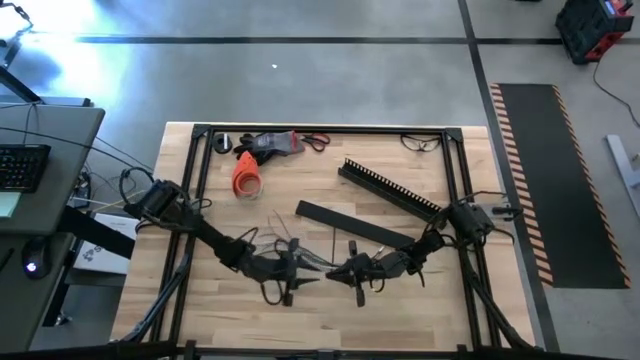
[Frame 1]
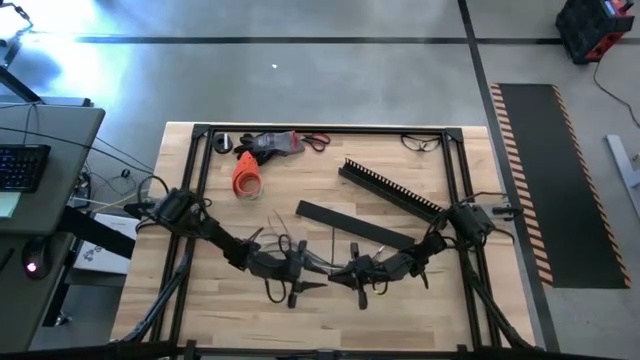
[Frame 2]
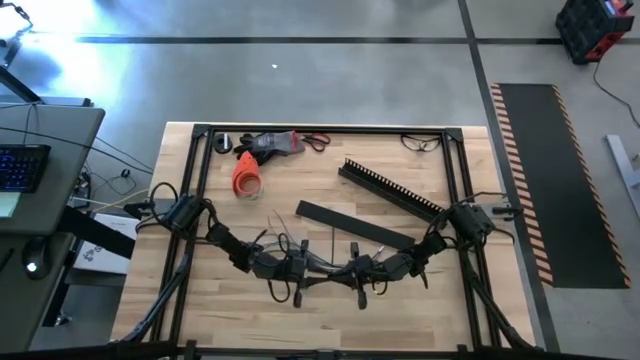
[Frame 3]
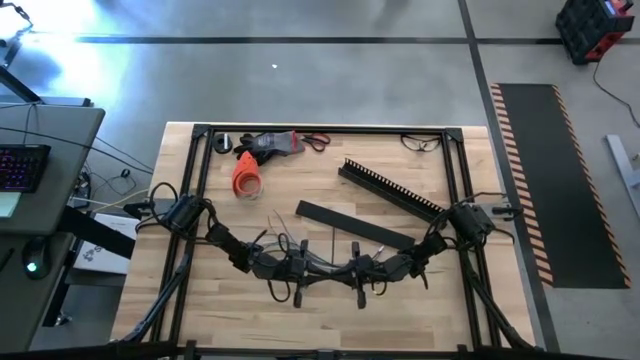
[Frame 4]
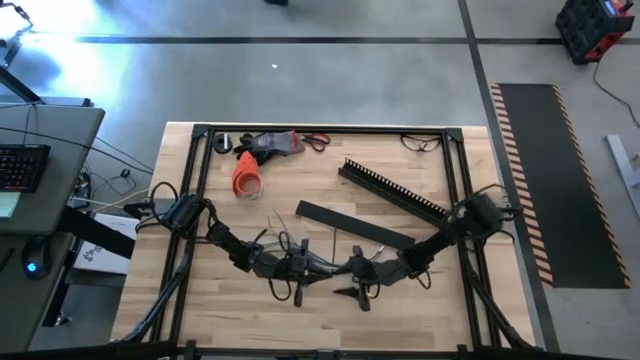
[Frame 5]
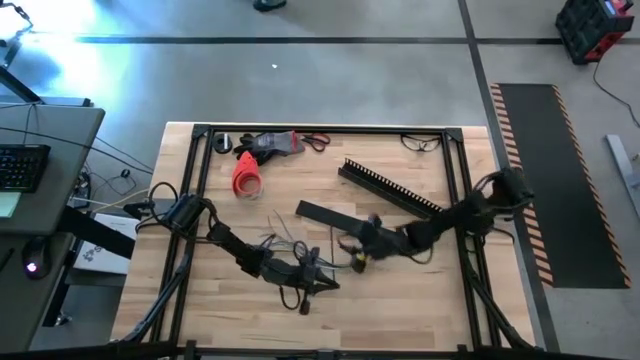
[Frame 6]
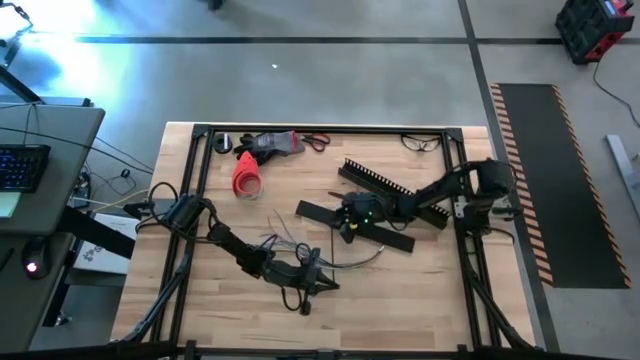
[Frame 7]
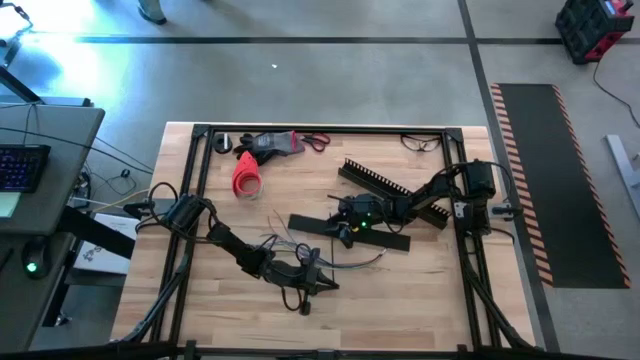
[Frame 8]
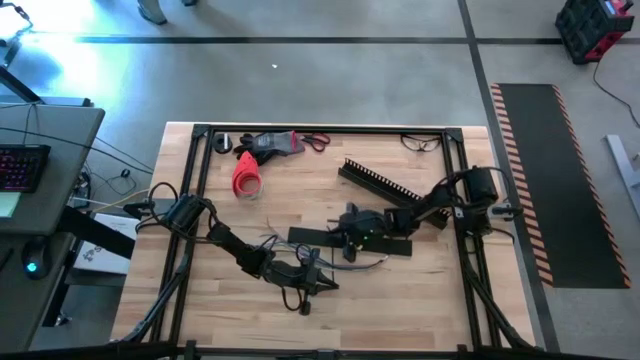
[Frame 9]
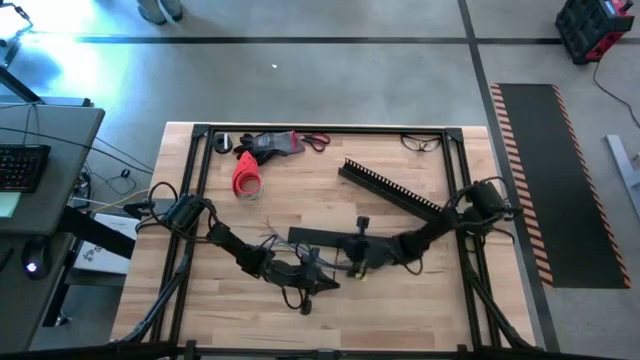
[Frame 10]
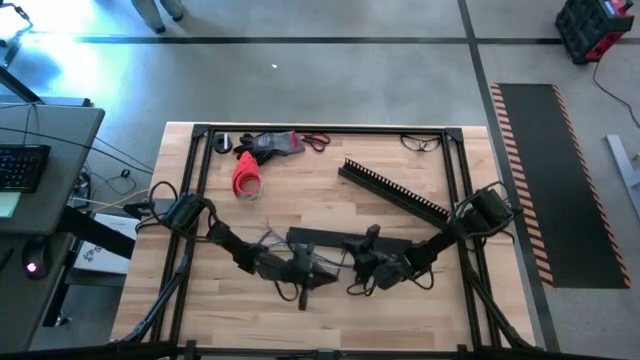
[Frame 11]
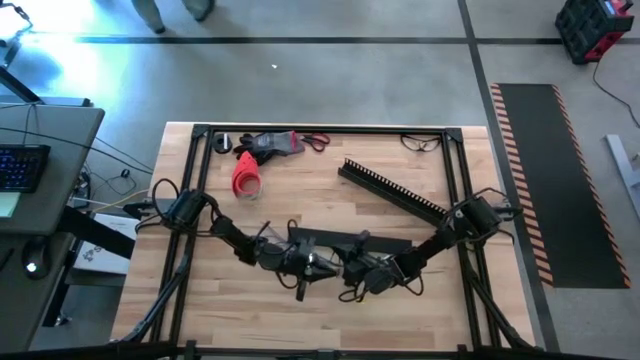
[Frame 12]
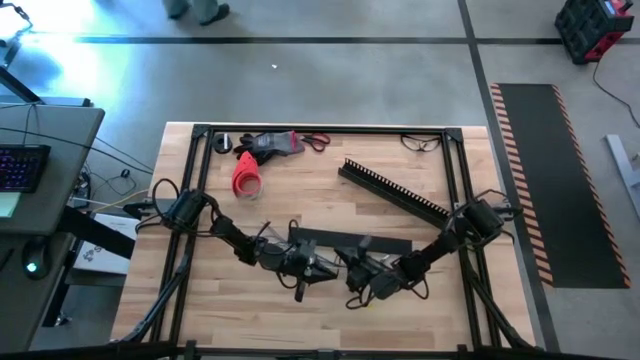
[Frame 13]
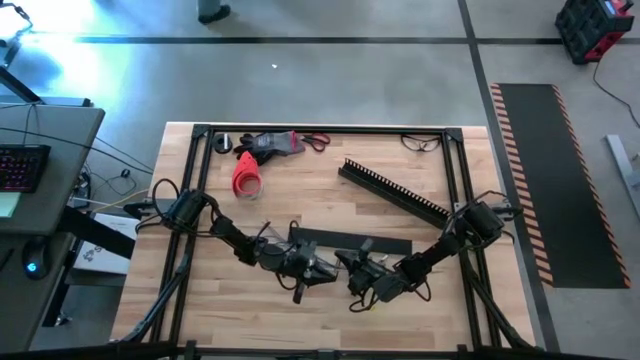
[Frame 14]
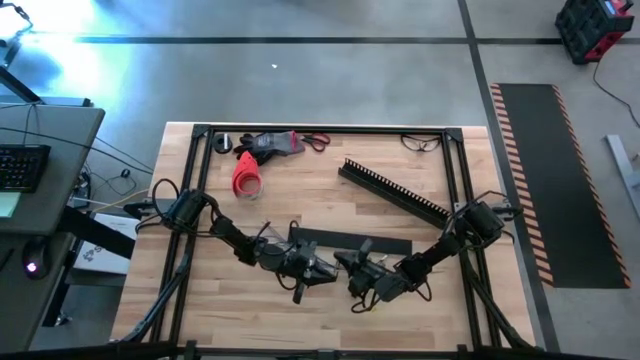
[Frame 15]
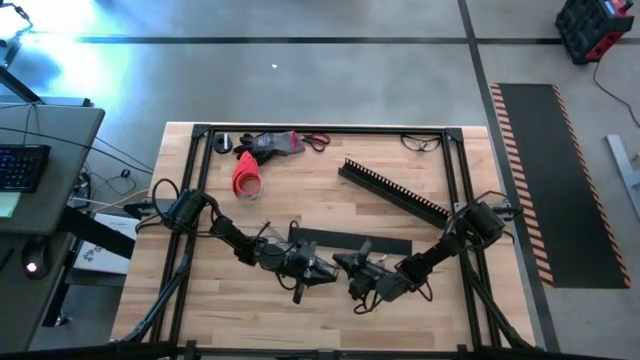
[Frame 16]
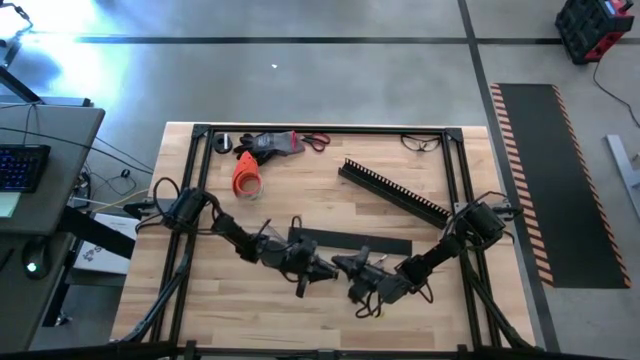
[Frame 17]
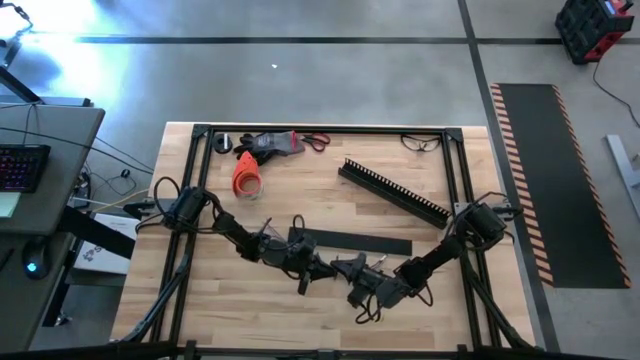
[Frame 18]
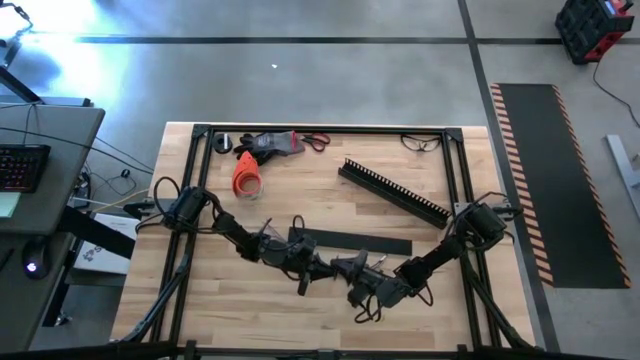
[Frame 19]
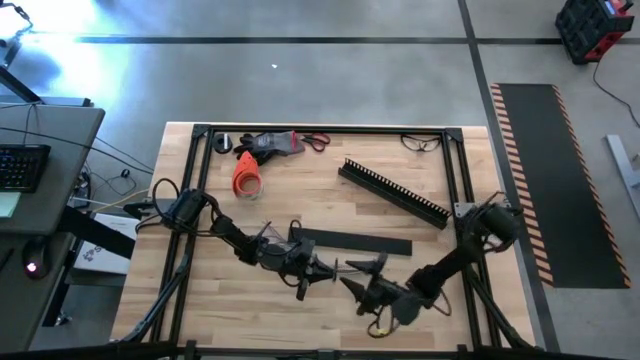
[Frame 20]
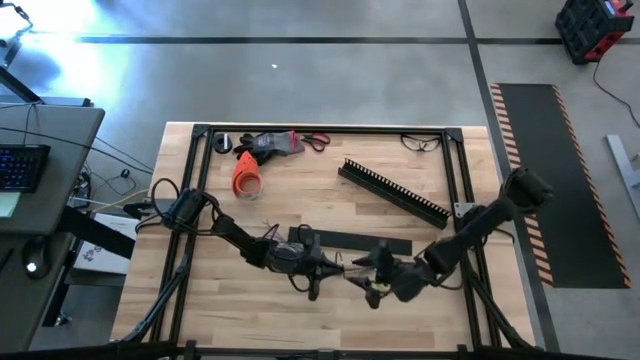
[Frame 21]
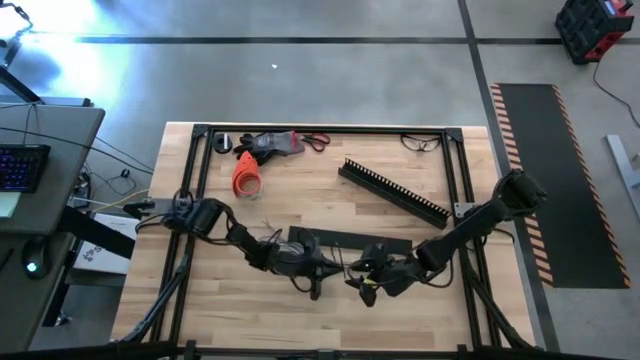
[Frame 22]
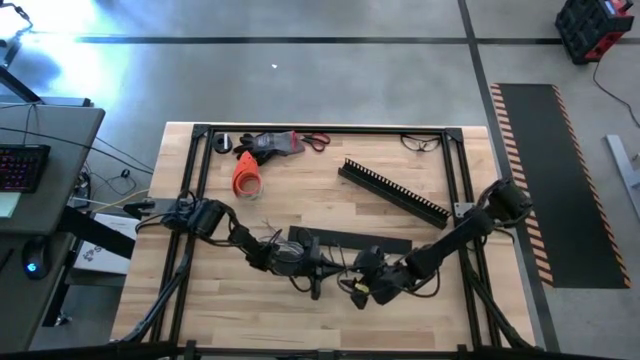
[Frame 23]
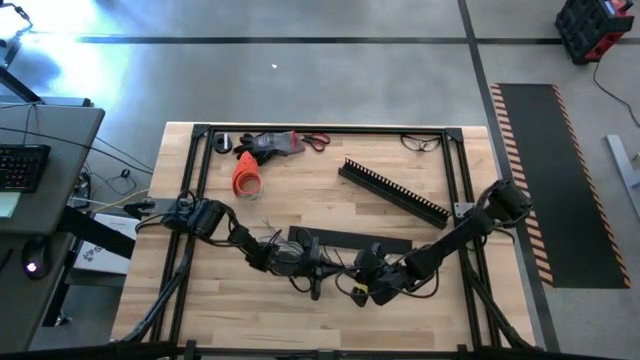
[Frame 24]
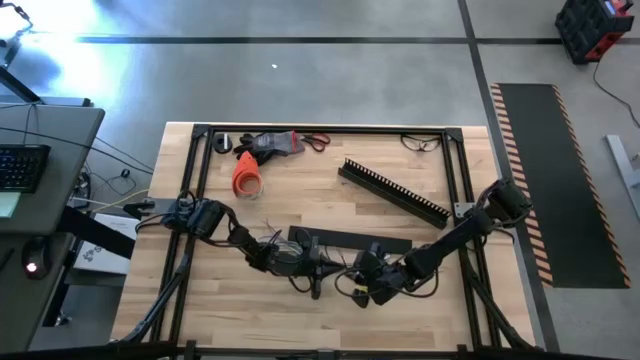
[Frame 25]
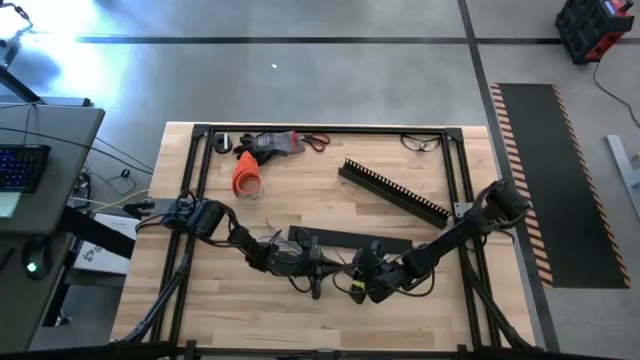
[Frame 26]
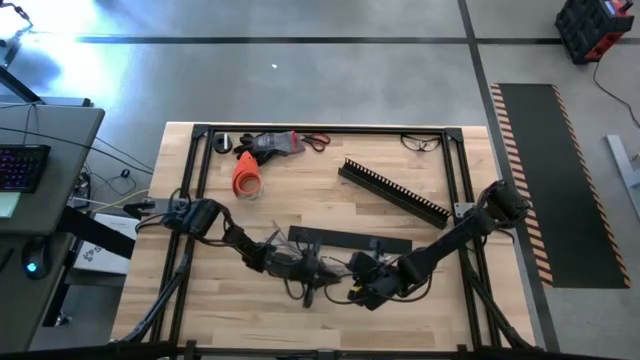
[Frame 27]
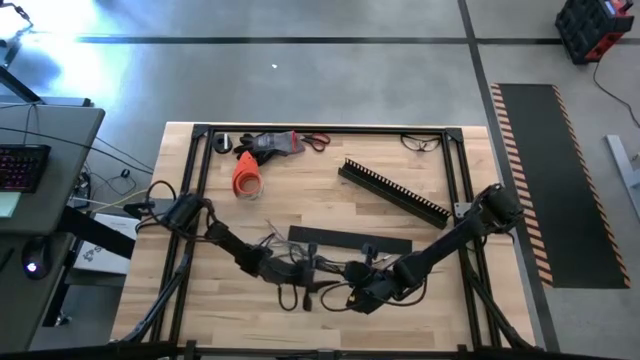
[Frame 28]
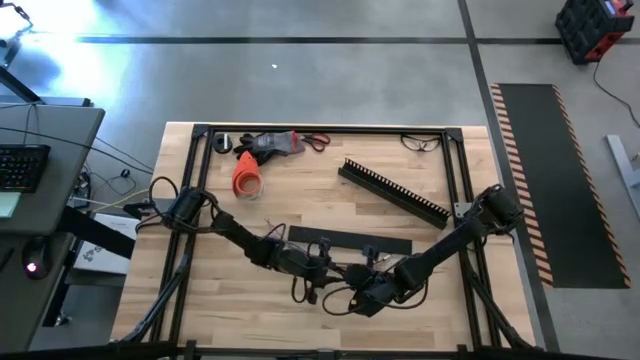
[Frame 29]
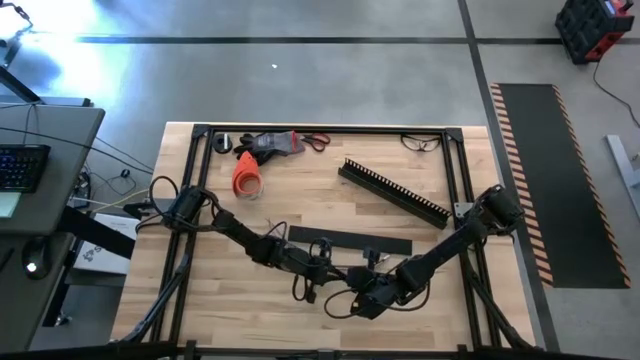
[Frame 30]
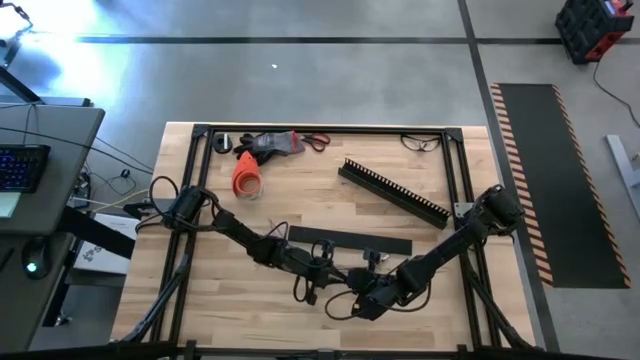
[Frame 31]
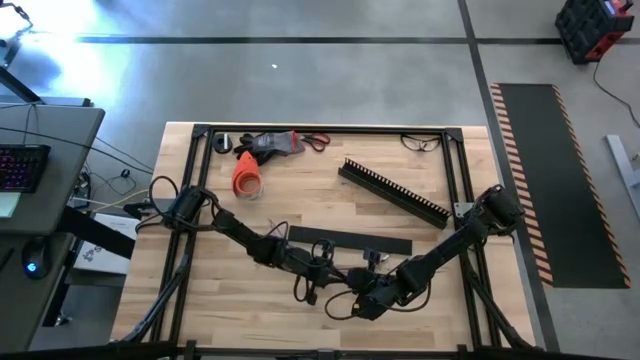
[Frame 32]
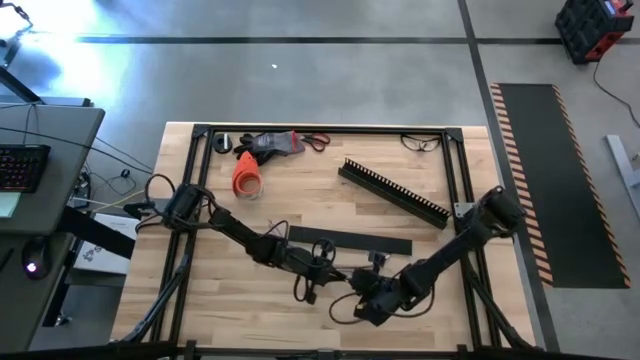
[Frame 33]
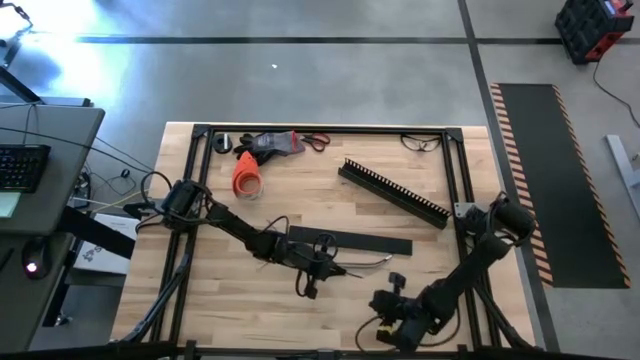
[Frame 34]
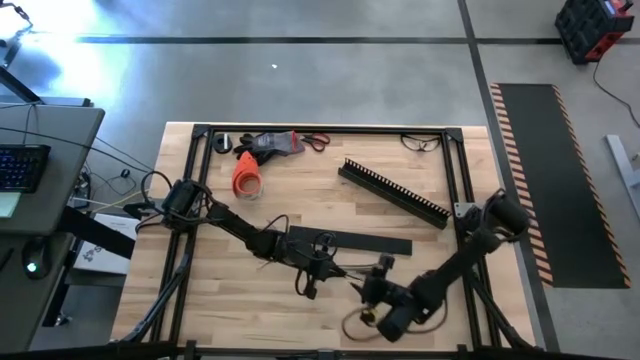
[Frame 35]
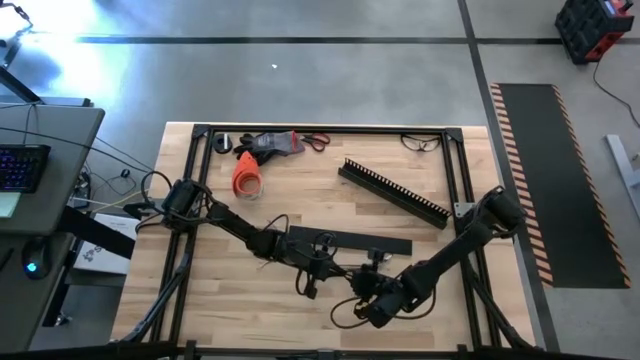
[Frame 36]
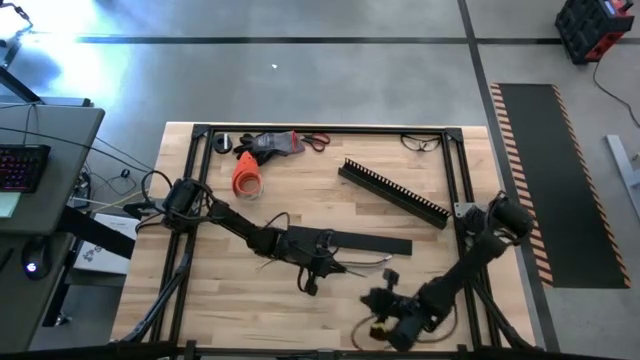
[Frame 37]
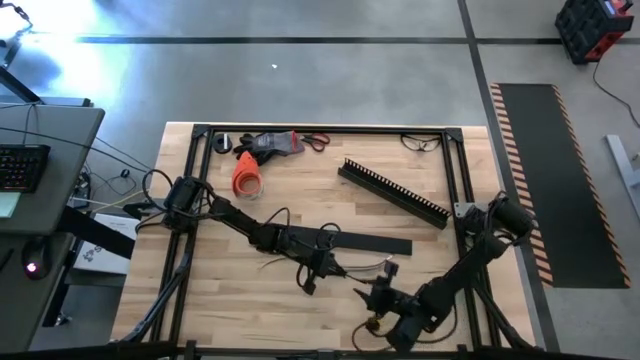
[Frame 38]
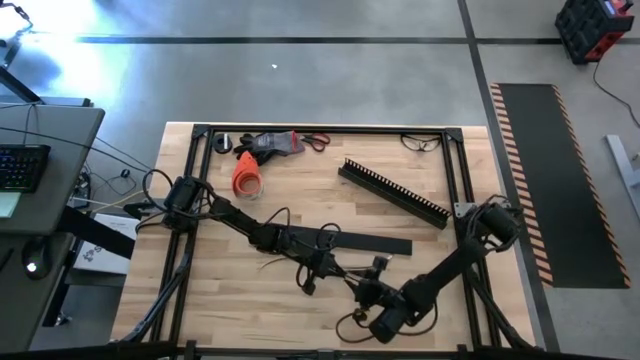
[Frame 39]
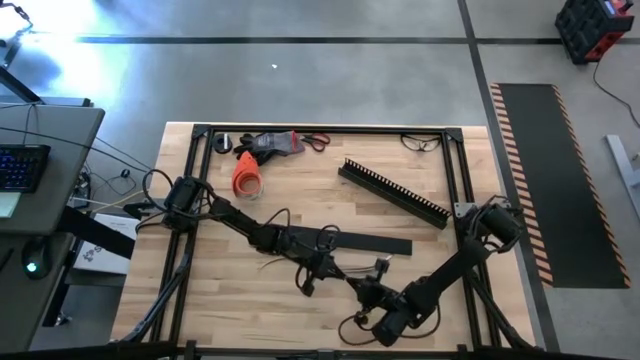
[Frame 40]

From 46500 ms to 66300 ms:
Task: Ziptie cables
Wrap the colored cables with the black zip tie
